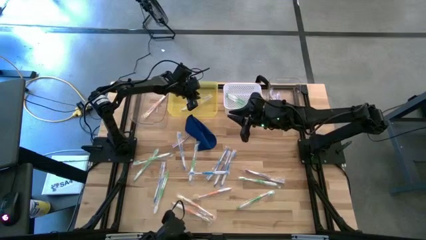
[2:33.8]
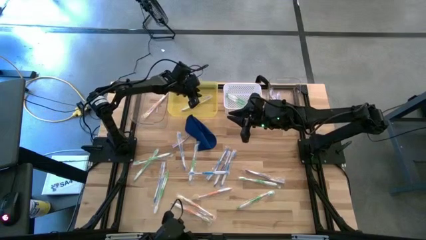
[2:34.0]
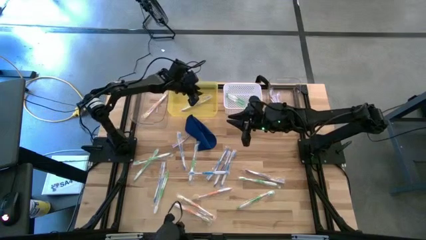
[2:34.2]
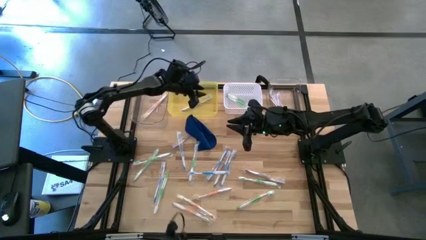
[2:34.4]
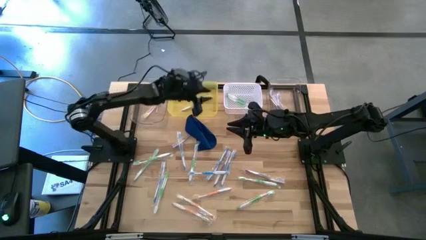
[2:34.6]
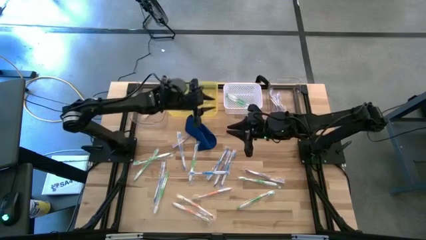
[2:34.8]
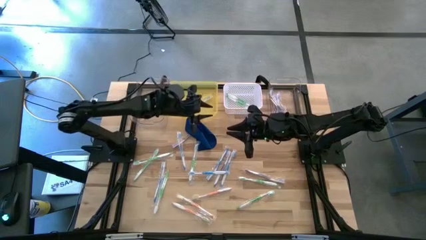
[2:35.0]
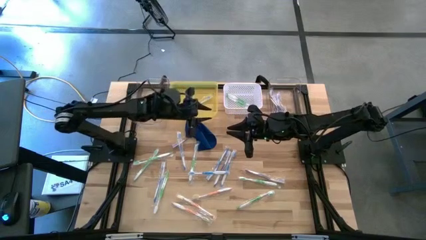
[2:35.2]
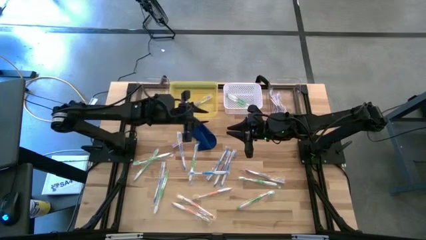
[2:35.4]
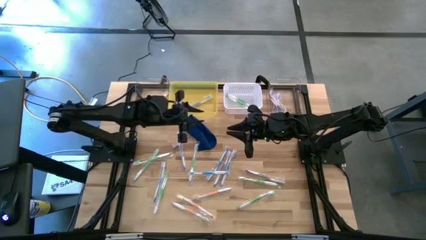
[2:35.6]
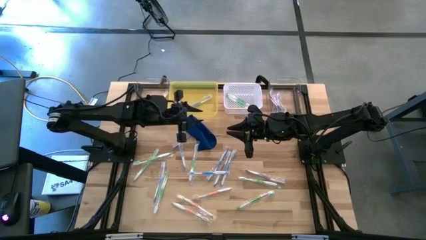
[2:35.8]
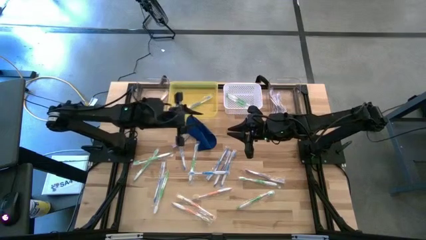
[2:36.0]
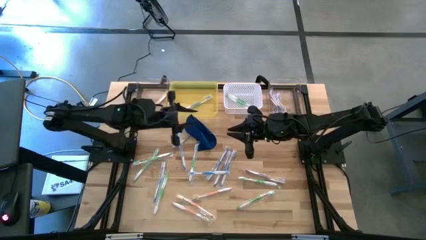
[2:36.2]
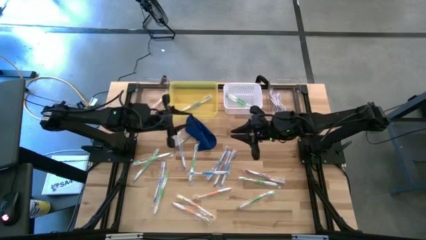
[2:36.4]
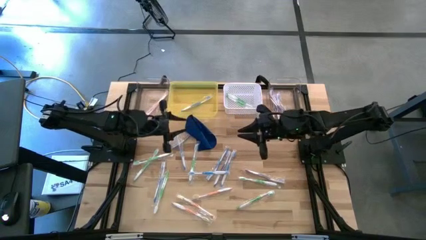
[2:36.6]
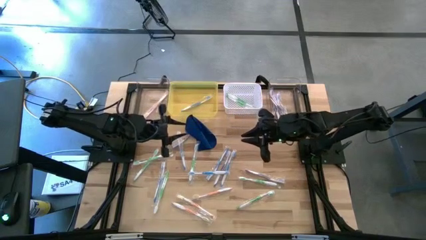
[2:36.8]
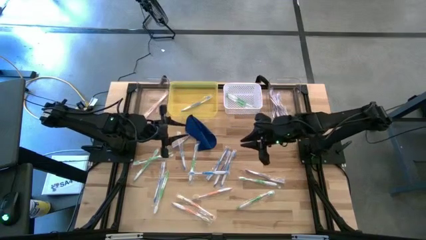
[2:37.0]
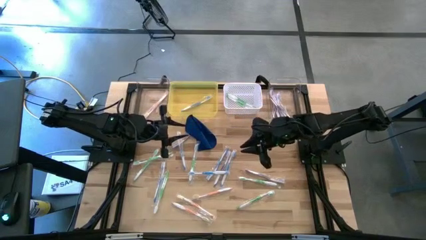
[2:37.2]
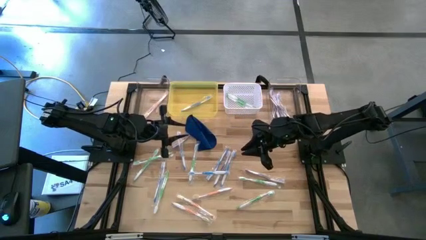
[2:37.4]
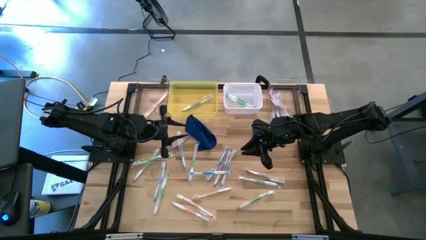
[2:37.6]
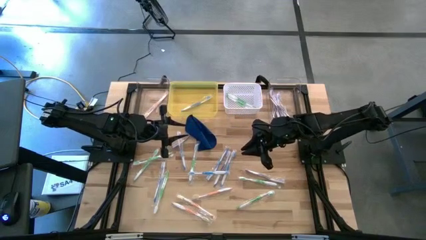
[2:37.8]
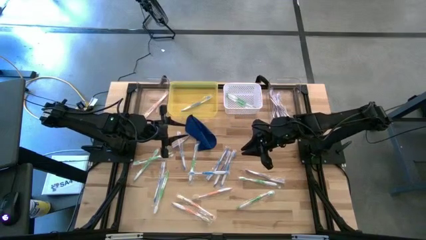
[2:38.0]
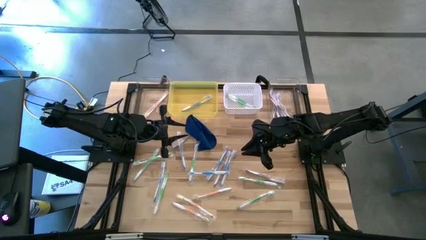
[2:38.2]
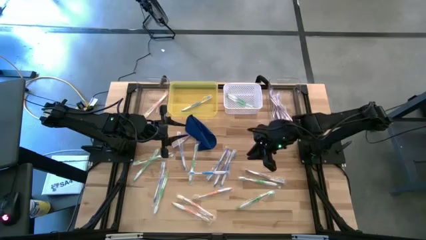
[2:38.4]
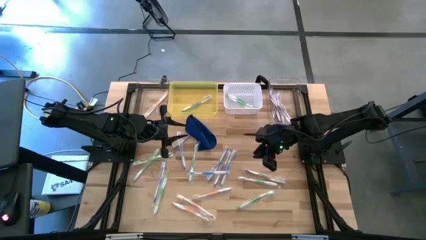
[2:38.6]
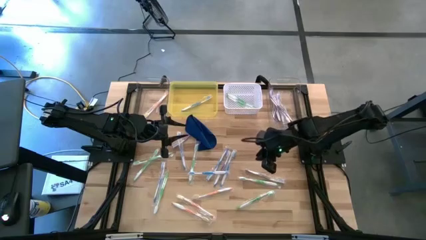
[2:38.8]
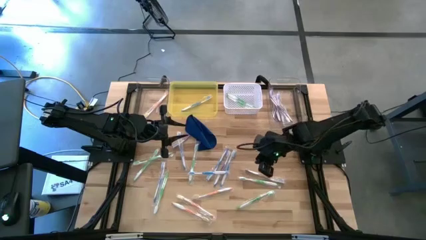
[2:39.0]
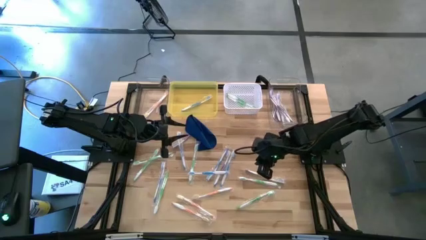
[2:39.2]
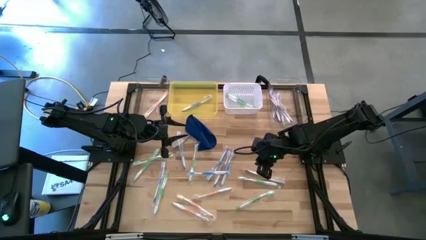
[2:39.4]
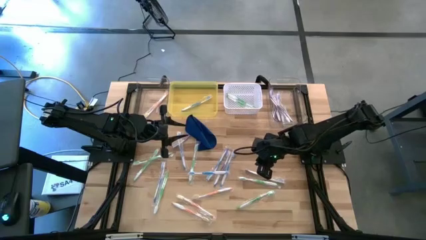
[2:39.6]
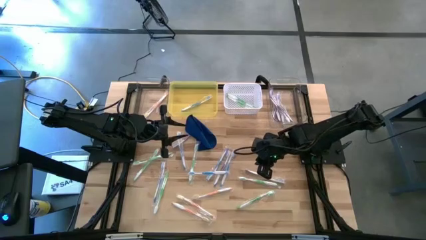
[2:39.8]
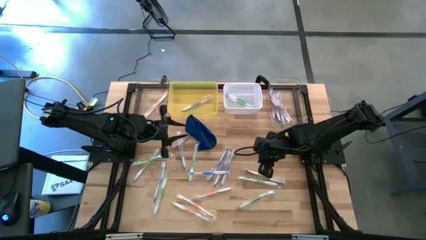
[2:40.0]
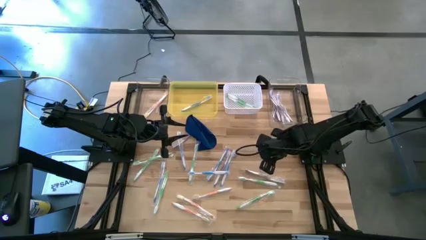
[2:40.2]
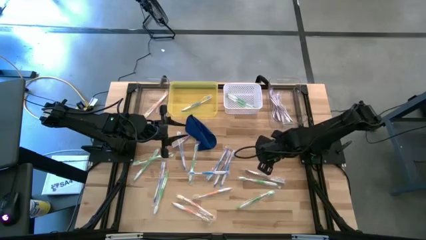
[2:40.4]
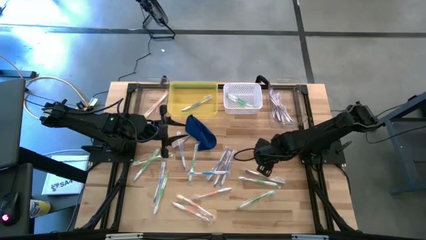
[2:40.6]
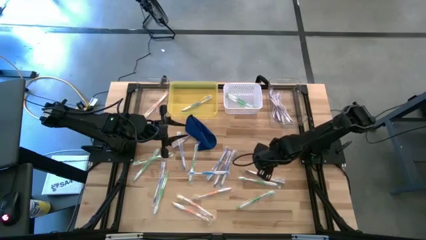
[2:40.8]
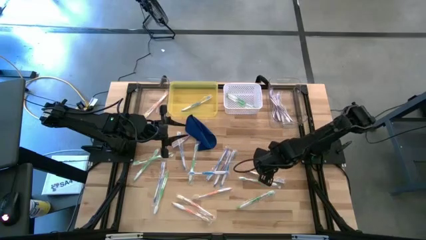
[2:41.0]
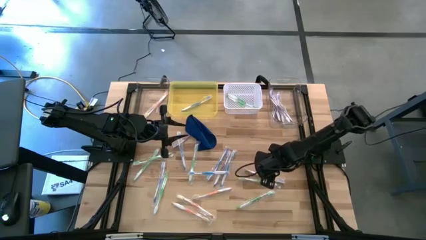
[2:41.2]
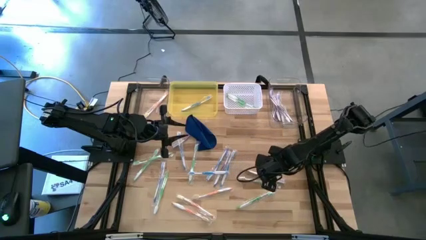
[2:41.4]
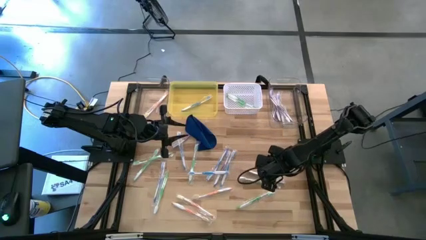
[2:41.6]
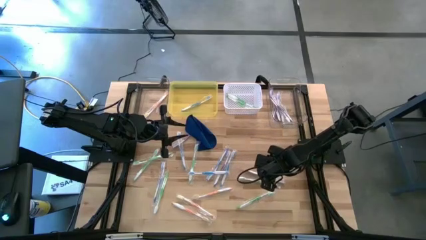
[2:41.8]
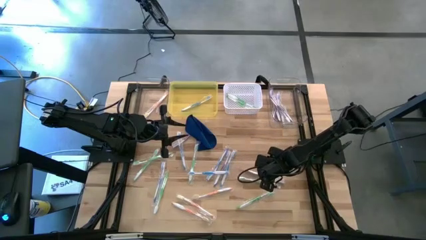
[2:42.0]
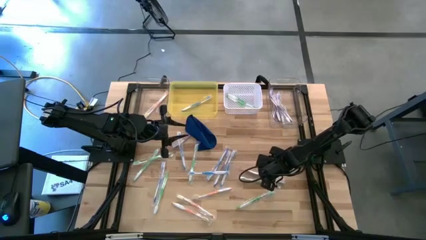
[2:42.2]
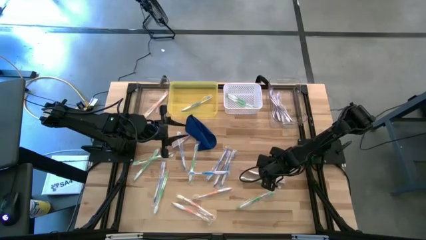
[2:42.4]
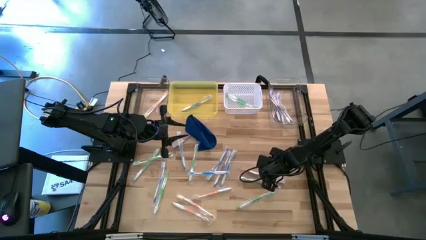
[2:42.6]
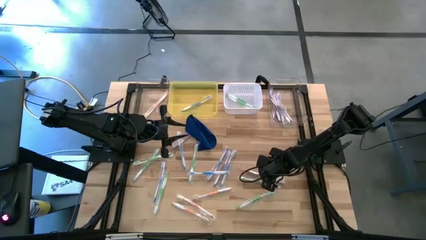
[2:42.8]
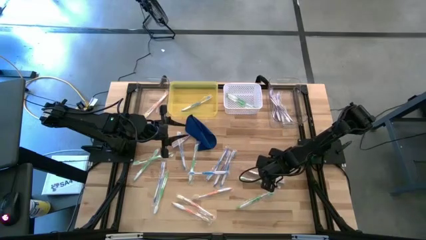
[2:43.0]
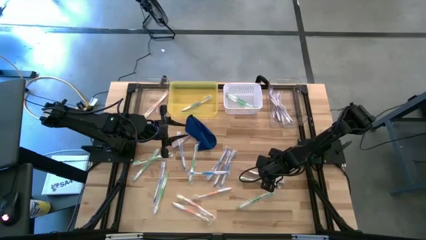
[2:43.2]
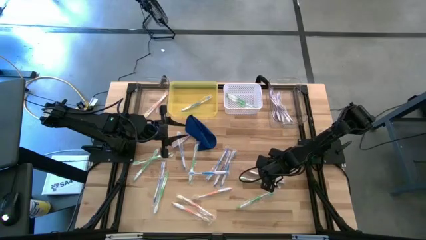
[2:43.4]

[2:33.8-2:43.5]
Task: Pick & Place Toothbrushes
Put the violet toothbrush into the right transparent bin

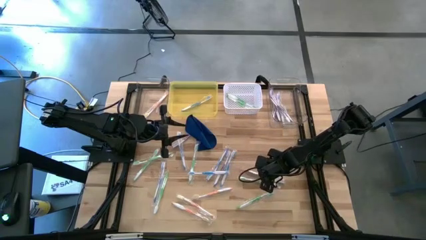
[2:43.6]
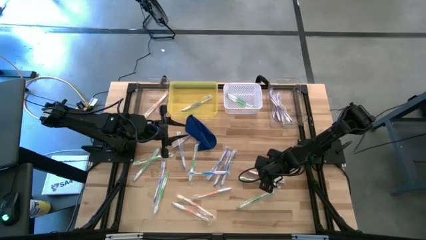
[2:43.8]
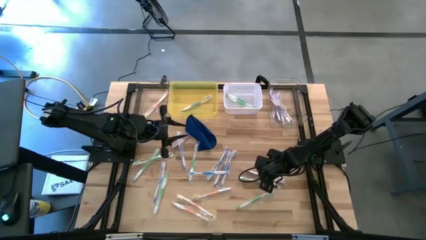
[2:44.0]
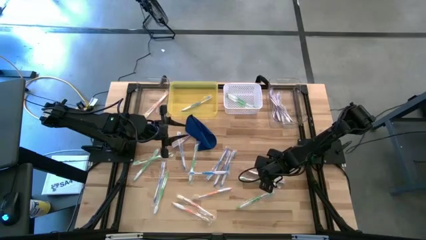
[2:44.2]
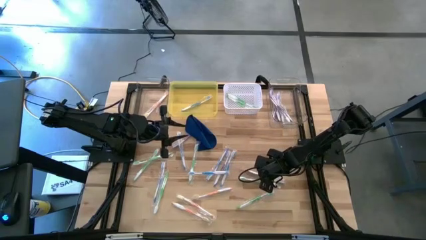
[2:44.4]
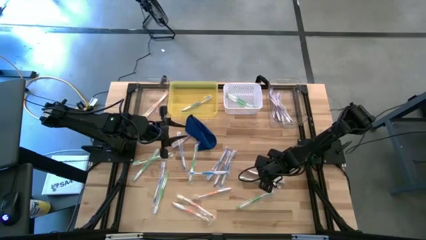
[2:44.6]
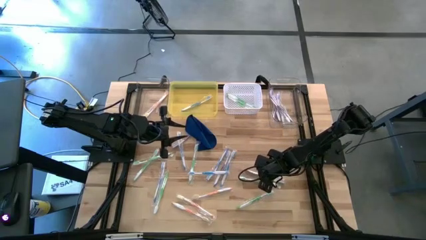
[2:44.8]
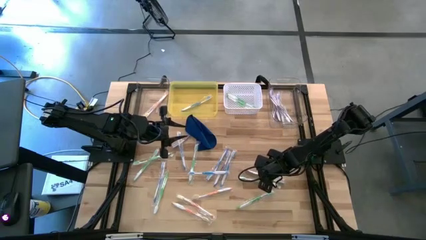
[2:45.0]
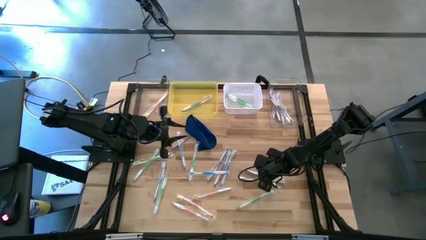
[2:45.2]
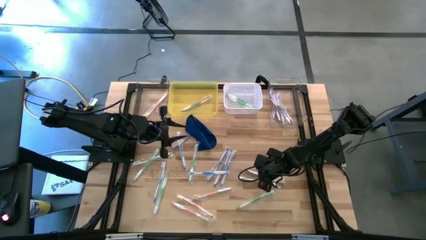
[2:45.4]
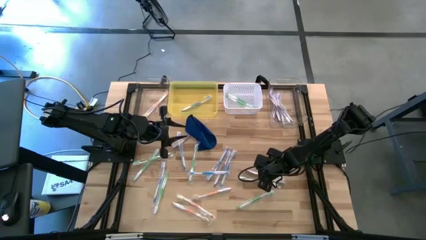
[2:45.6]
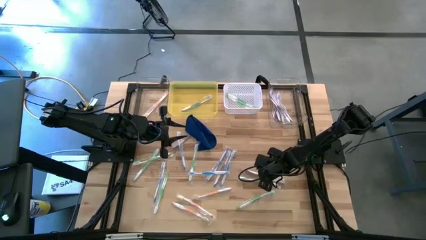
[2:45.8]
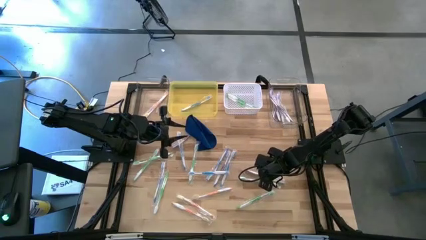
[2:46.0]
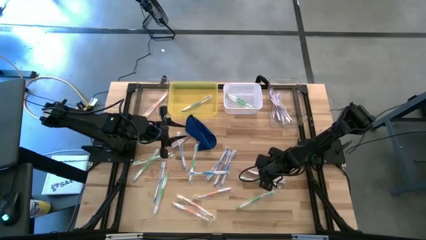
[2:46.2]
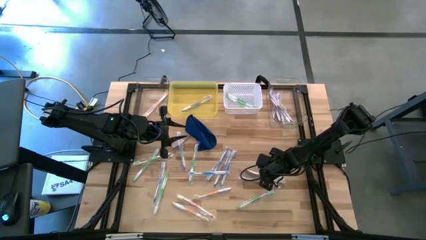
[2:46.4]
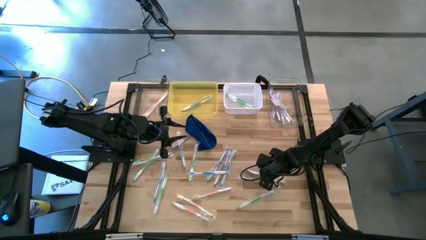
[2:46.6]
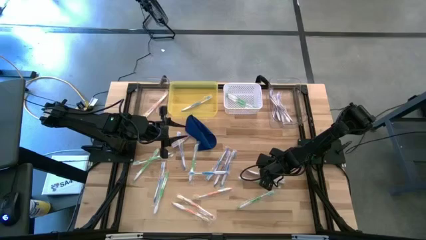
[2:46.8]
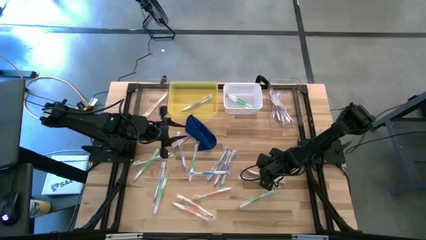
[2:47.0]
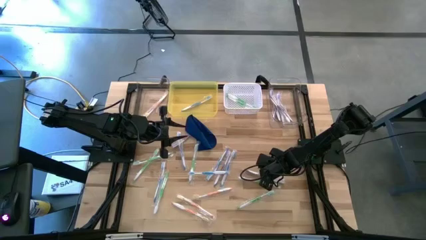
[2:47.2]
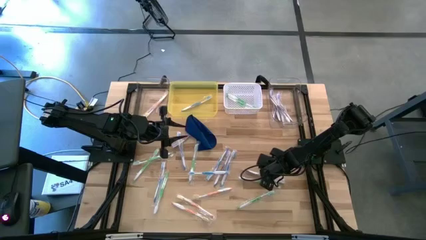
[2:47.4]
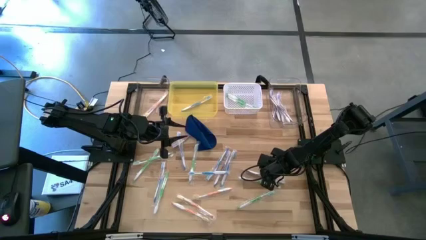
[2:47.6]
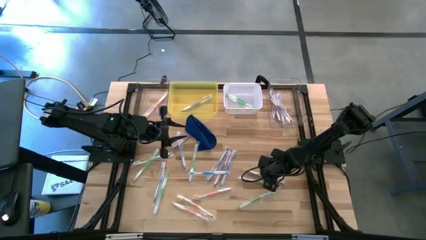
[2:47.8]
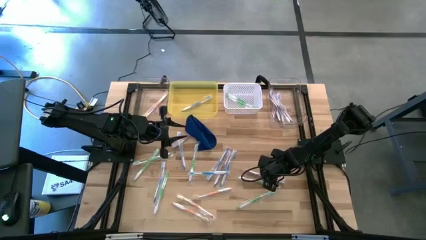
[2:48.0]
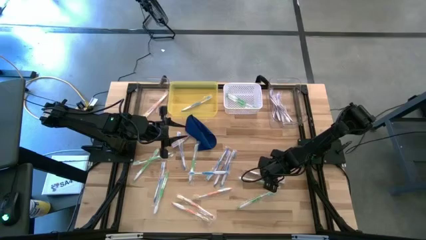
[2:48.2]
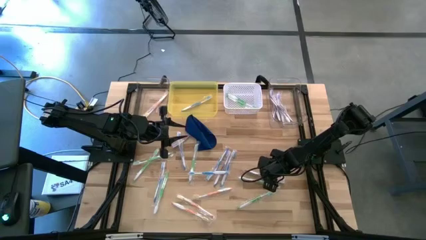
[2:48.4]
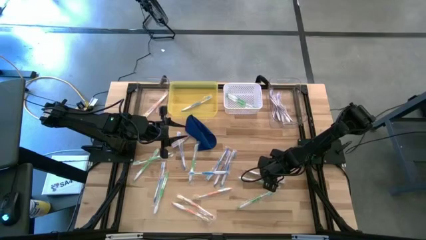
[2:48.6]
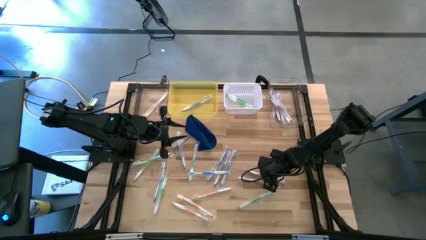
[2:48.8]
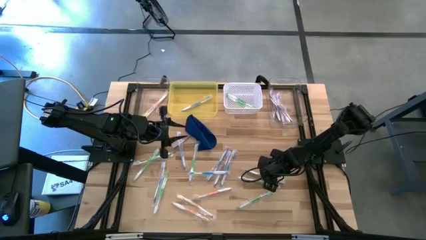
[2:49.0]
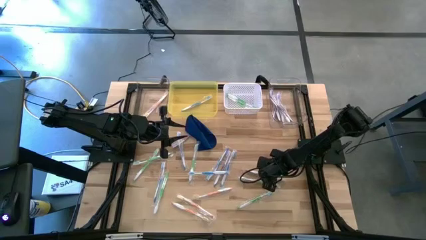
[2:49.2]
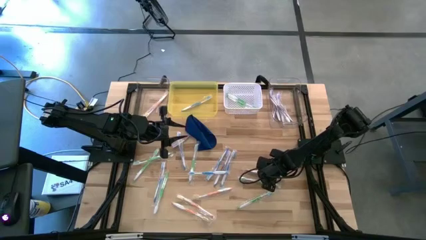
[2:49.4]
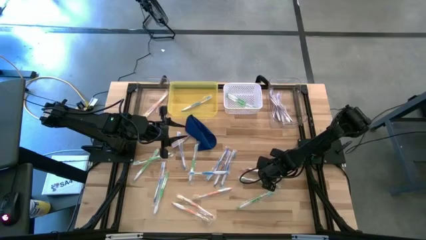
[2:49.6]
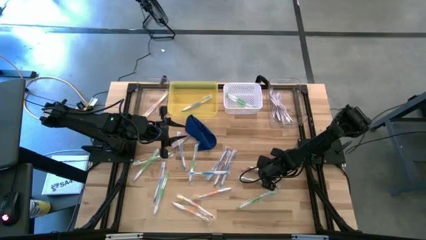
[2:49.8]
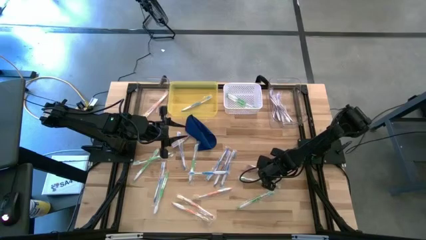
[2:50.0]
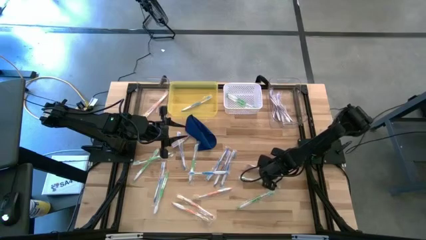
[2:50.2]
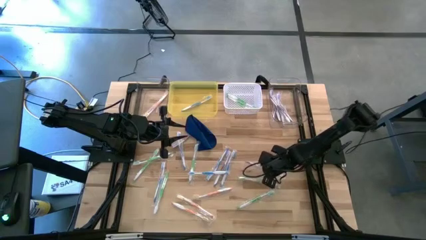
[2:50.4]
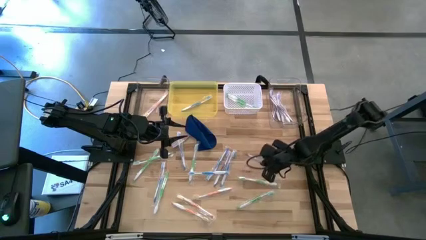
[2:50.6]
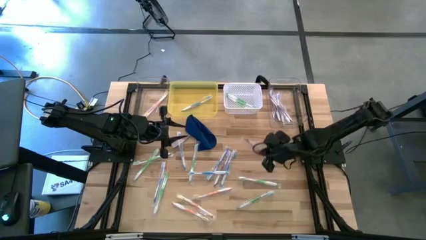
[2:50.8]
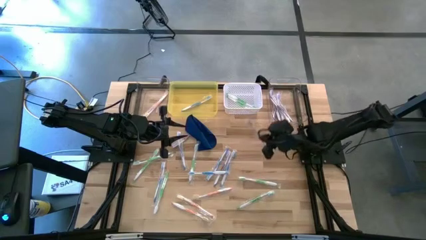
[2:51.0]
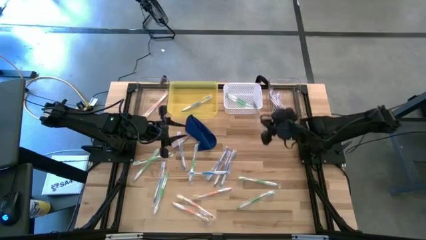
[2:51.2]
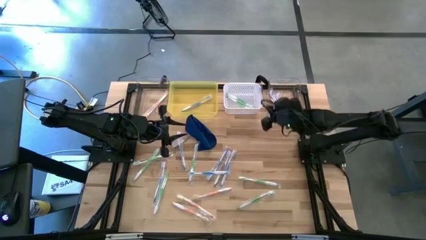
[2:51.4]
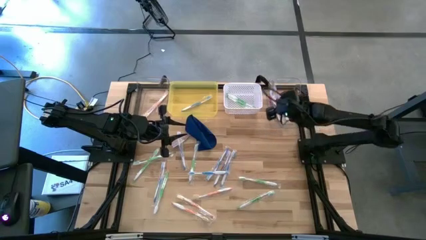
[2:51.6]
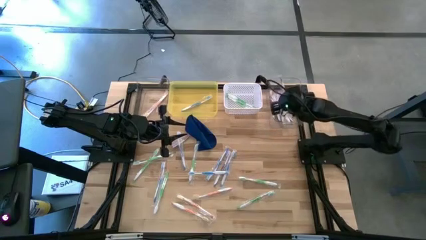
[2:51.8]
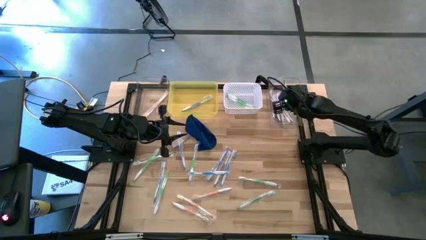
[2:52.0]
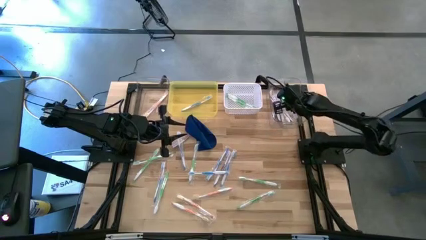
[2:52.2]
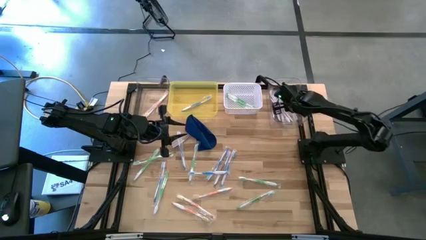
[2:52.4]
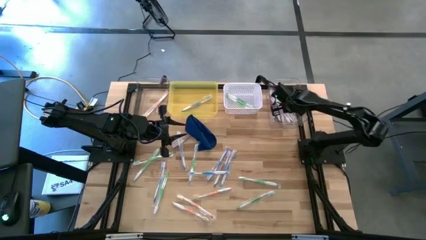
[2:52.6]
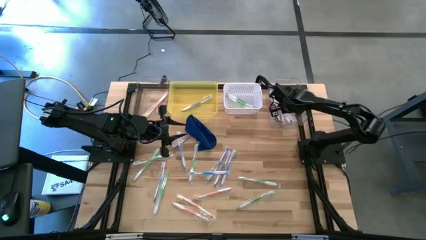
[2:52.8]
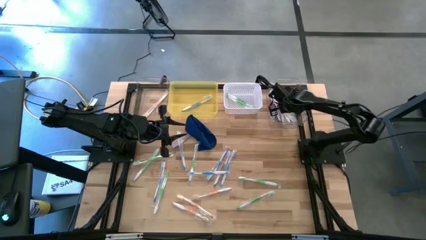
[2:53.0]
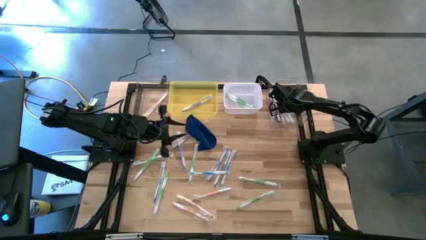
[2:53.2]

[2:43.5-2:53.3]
Put the violet toothbrush into the right transparent bin
